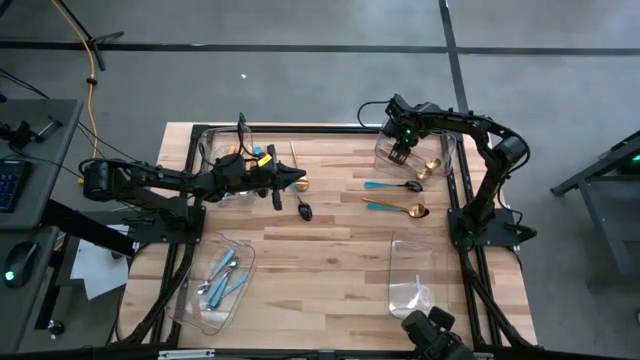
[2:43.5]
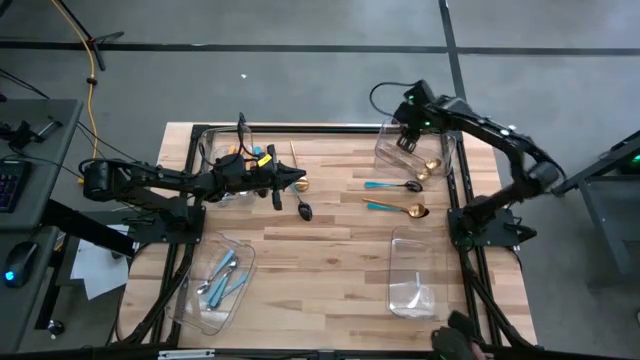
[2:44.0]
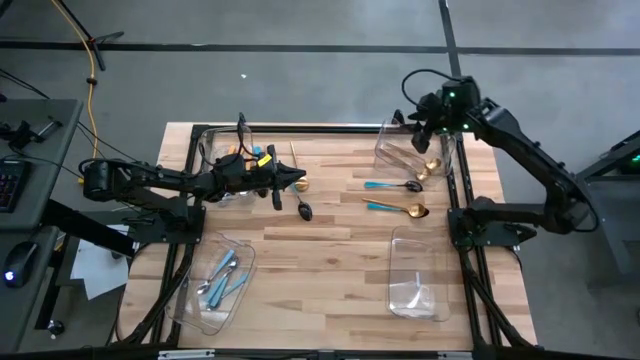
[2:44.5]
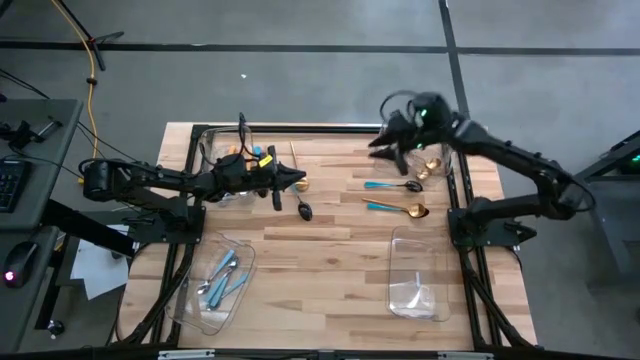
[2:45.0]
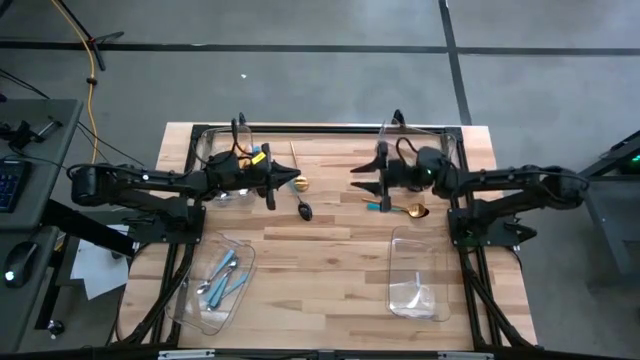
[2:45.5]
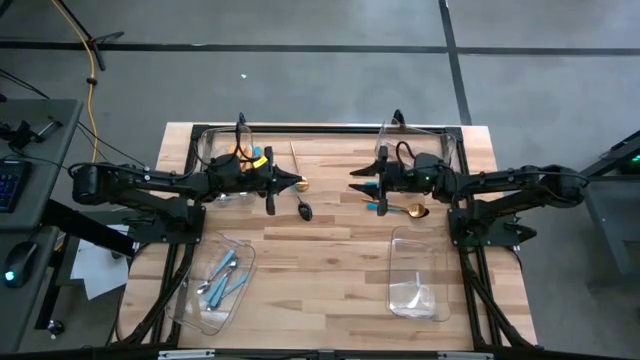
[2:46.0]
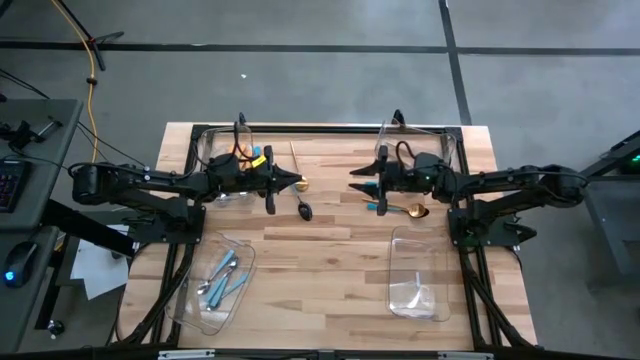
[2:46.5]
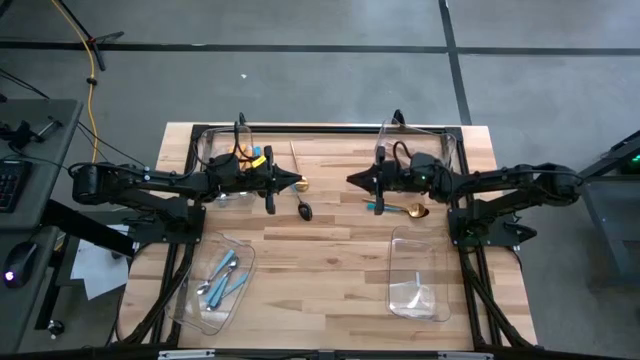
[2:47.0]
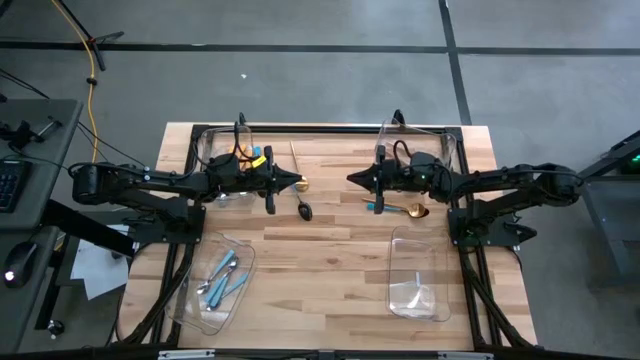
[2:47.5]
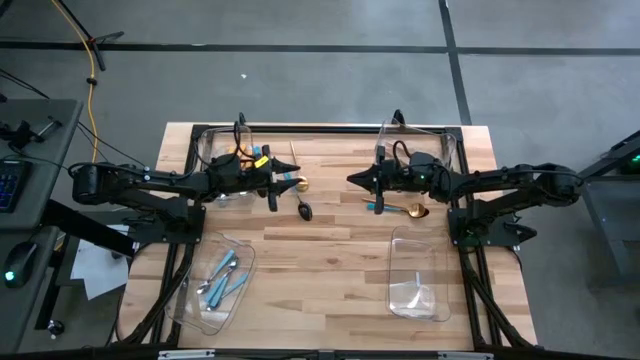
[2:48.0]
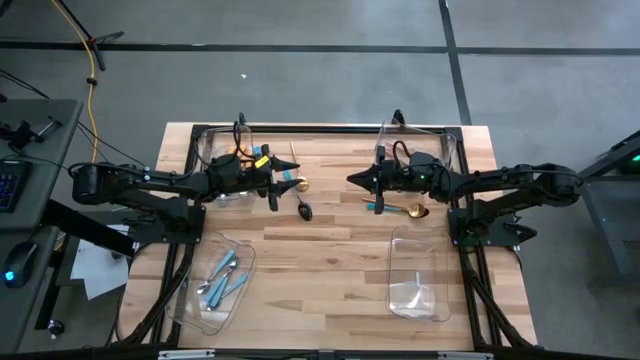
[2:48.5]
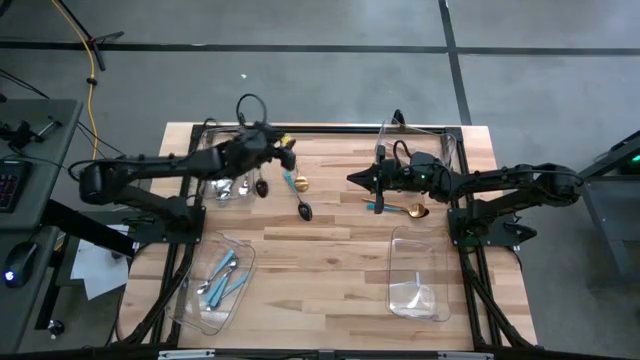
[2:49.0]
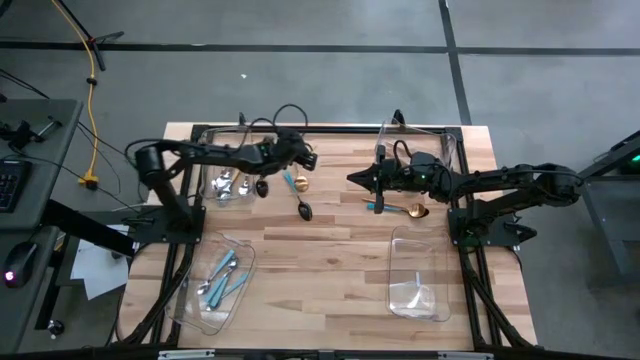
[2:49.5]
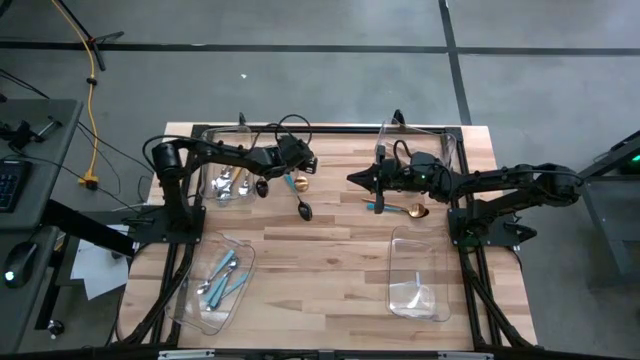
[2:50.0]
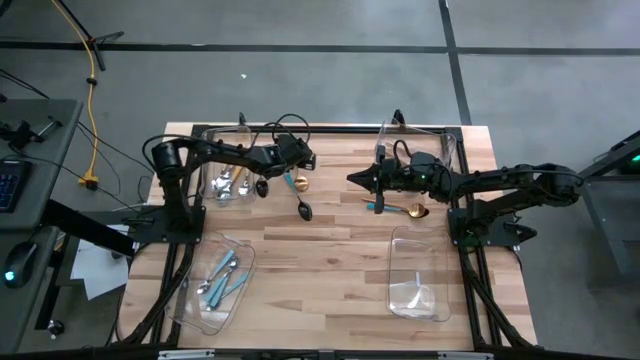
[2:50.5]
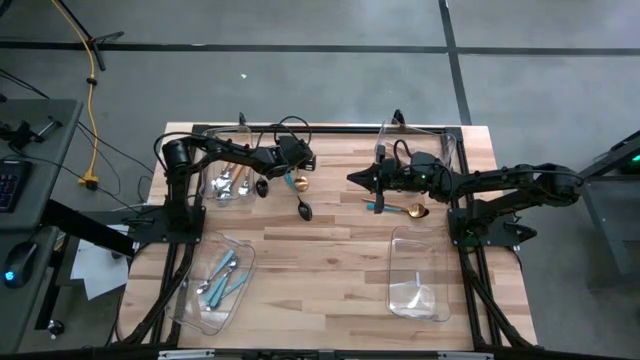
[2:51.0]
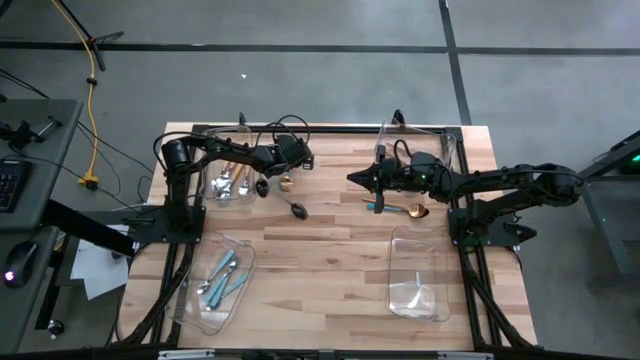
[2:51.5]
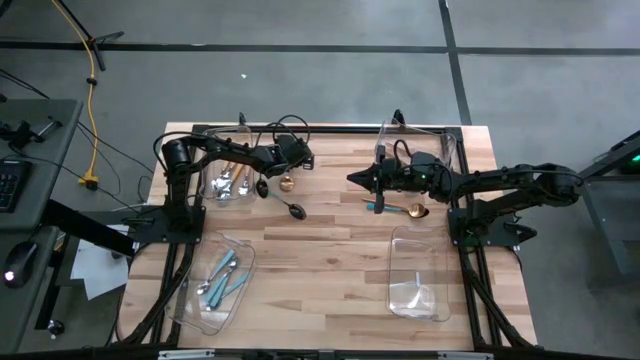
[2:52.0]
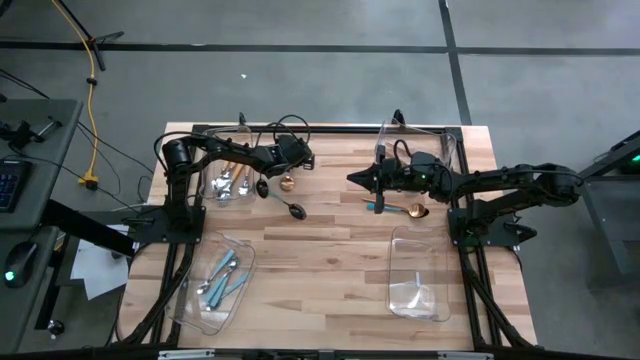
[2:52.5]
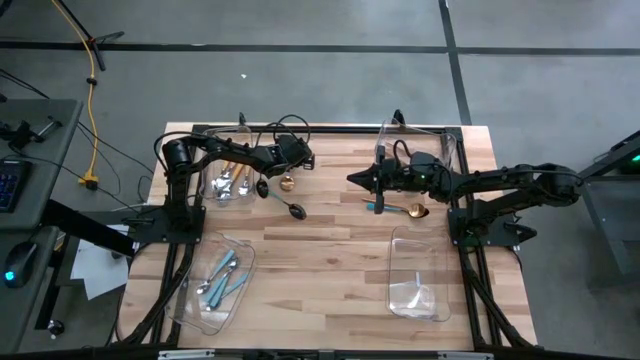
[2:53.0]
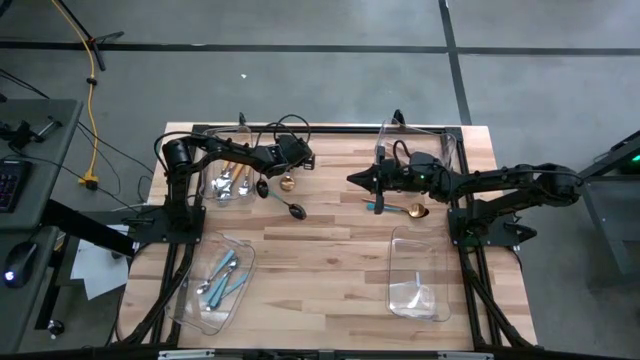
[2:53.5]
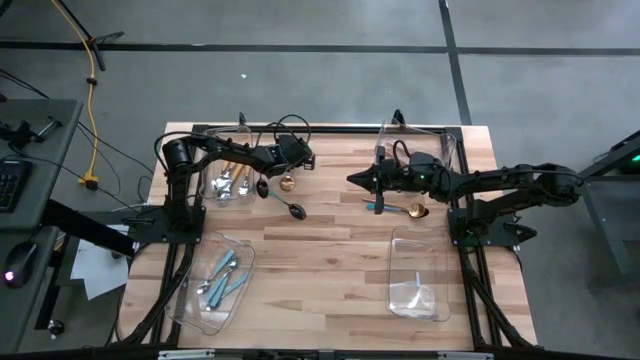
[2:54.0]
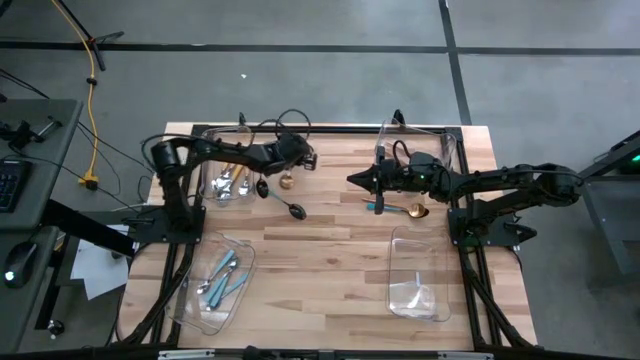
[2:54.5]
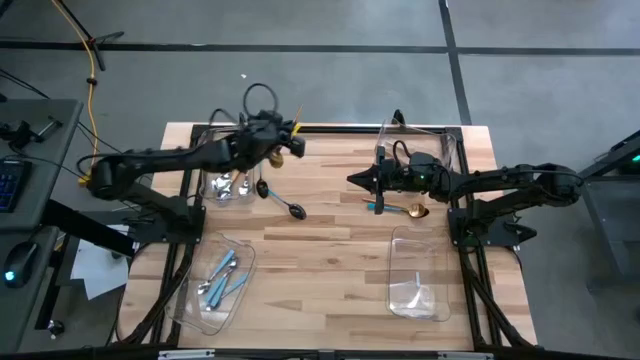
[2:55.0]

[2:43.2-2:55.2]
Task: Sort silverware by color (type)
Put the gold spoon into the top right transparent bin

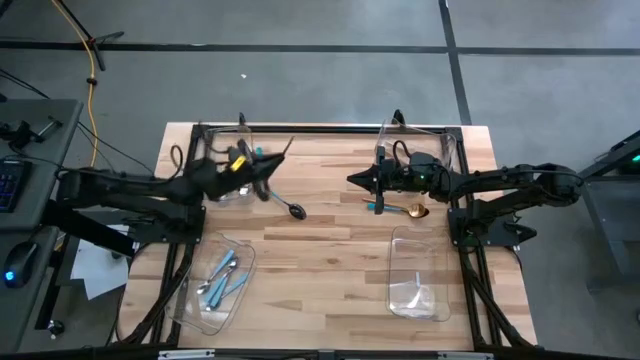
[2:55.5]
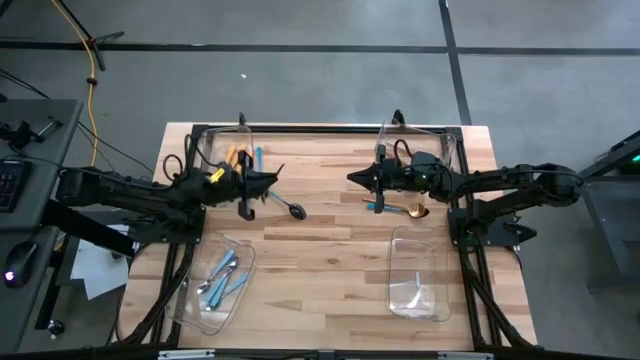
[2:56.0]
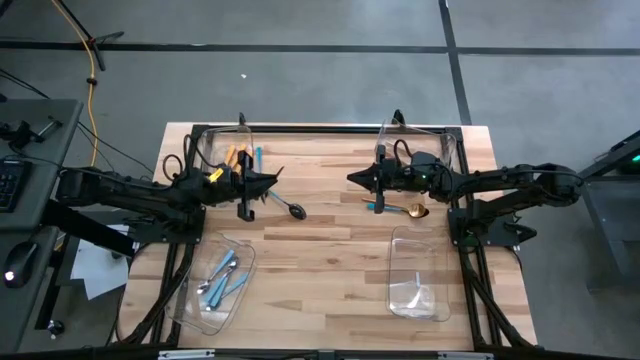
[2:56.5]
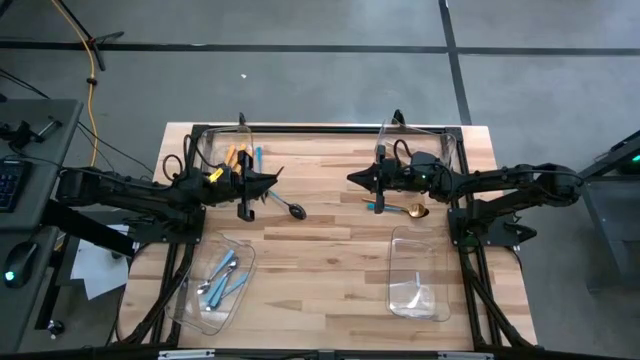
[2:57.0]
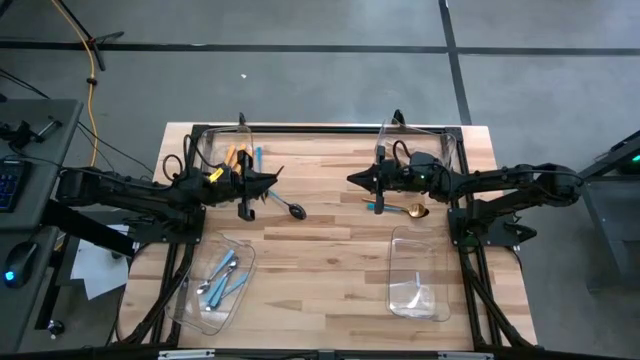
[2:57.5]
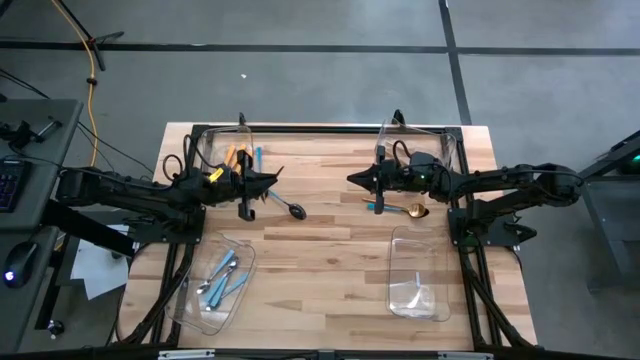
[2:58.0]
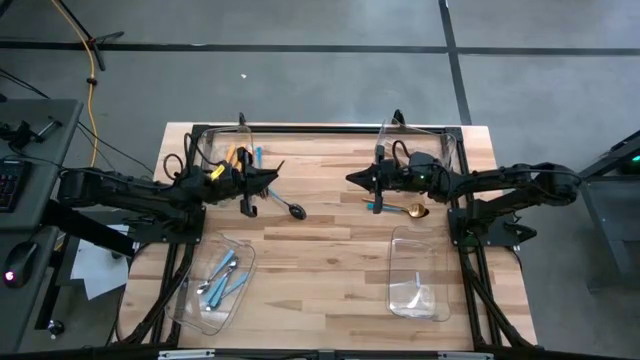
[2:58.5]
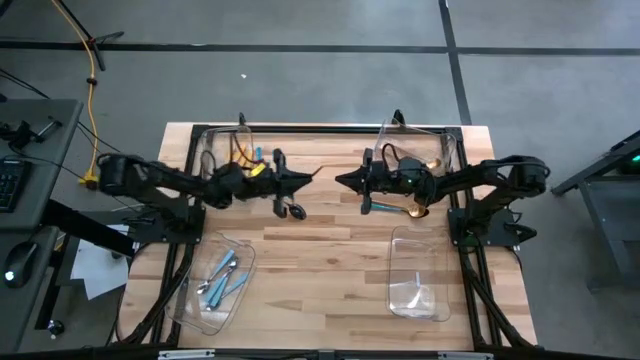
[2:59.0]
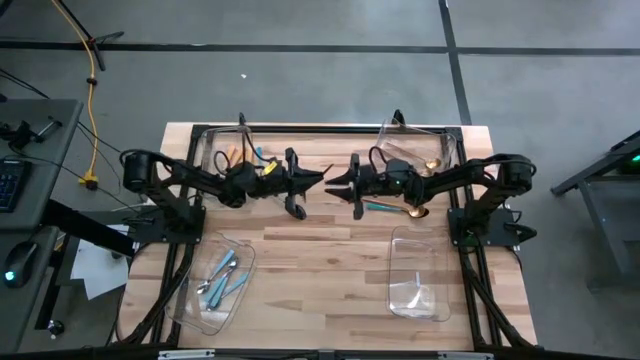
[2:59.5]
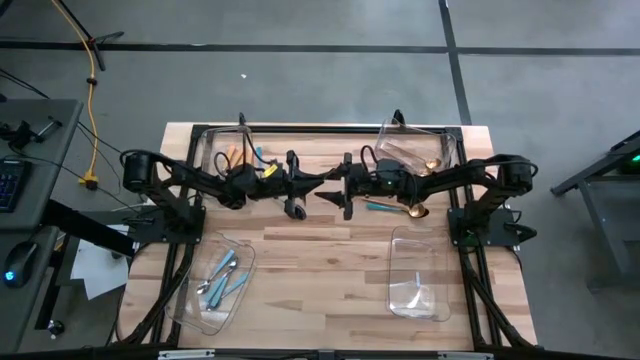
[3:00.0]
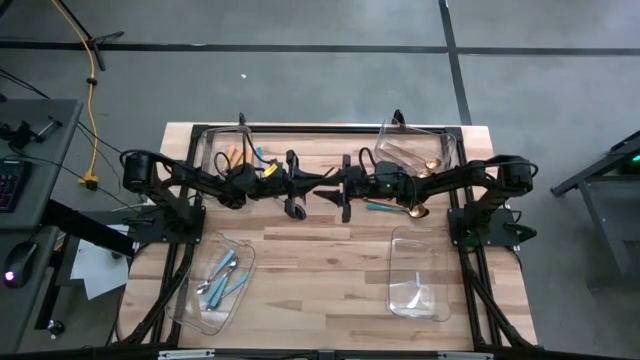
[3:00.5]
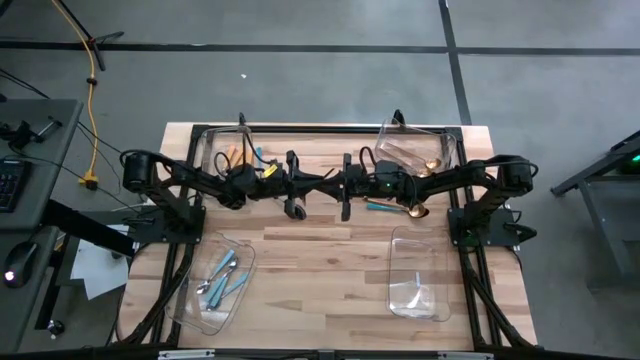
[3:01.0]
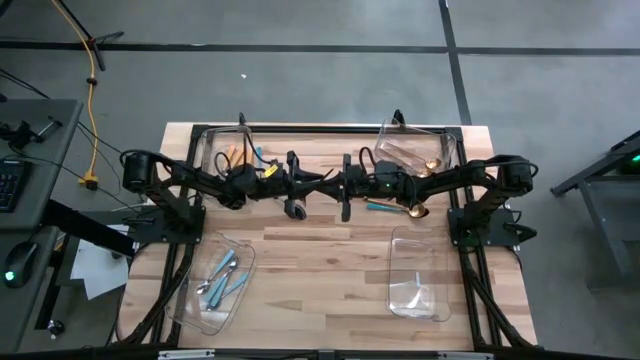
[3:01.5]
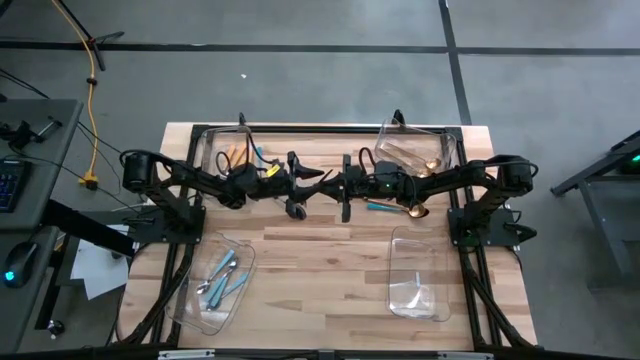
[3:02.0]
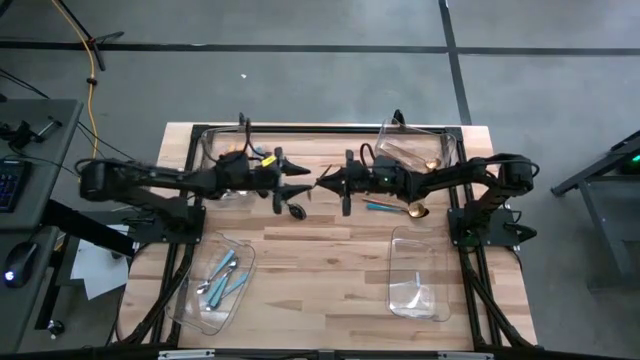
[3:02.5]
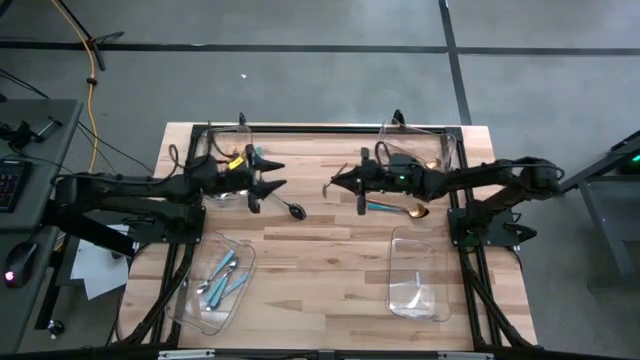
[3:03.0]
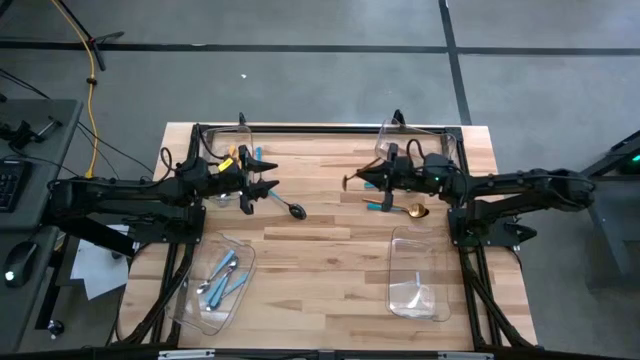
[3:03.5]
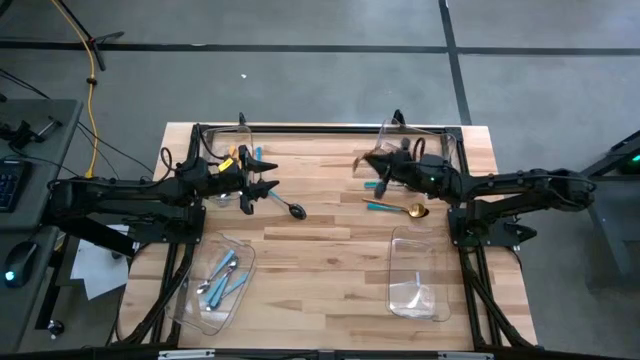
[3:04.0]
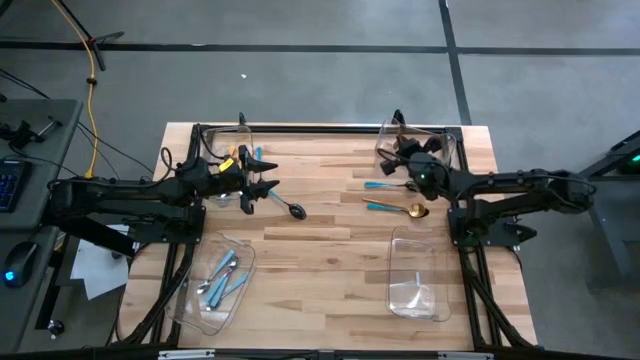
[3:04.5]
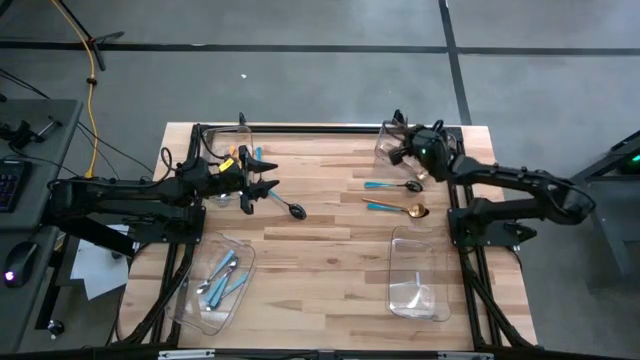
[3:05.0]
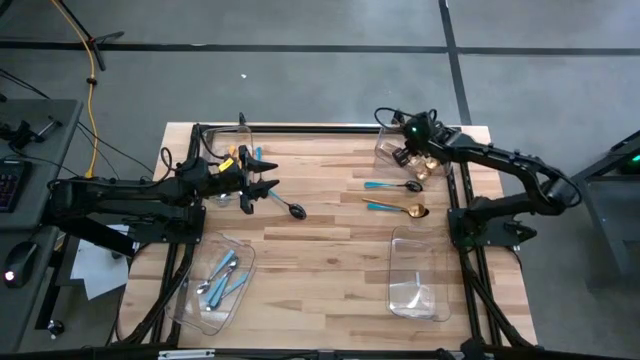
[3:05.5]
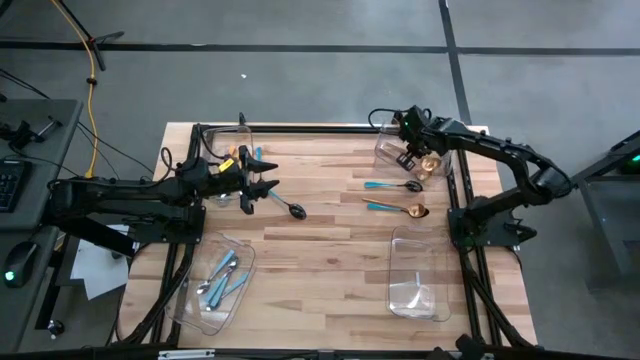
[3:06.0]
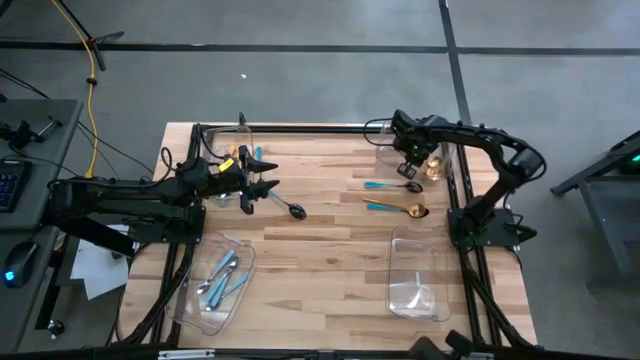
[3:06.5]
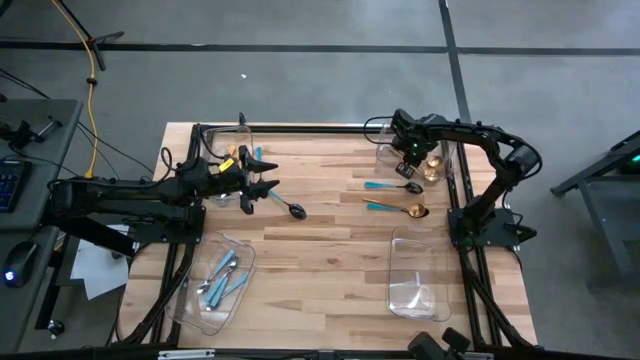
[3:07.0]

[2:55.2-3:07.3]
Put the gold spoon into the top right transparent bin
